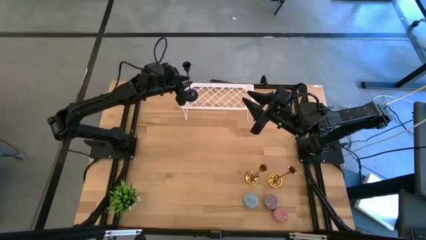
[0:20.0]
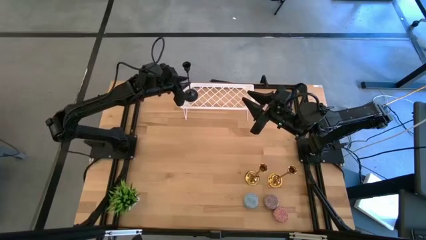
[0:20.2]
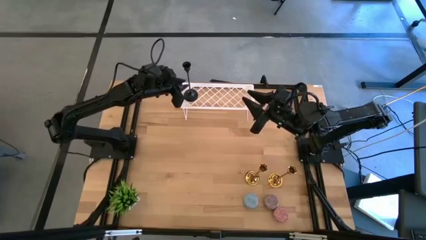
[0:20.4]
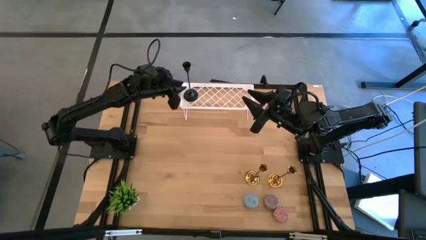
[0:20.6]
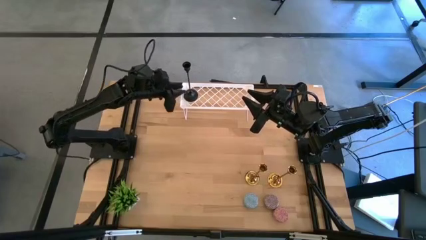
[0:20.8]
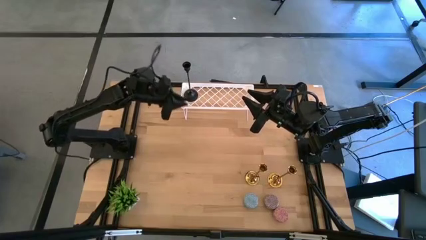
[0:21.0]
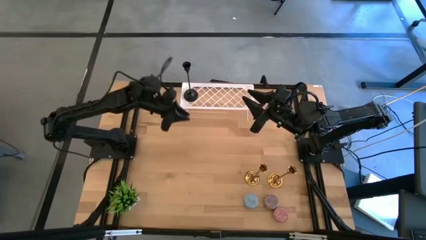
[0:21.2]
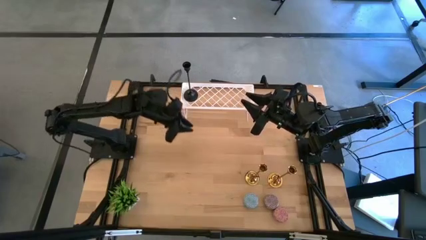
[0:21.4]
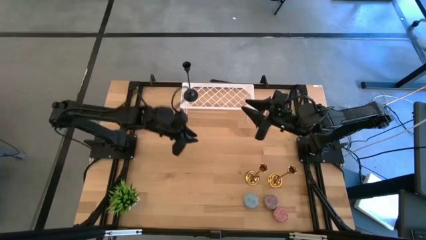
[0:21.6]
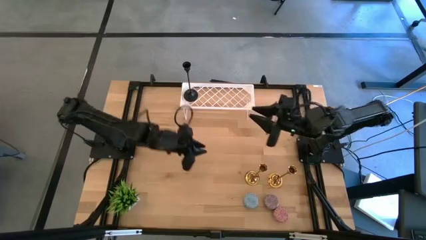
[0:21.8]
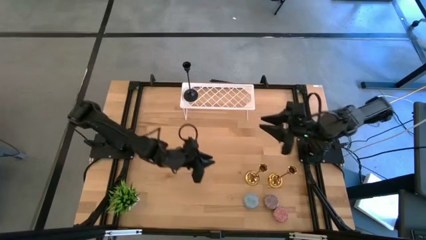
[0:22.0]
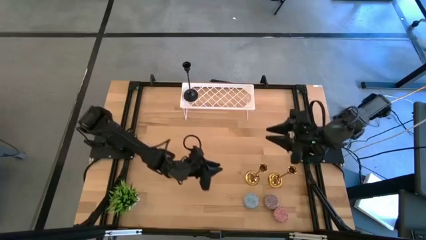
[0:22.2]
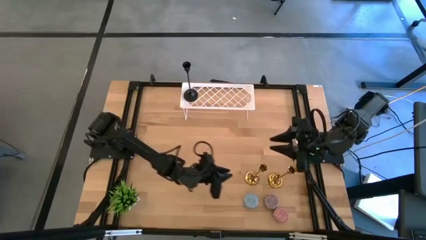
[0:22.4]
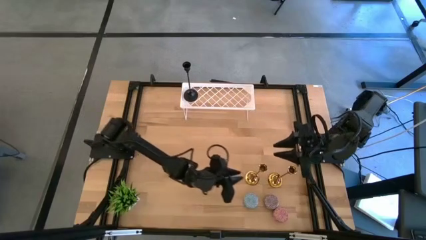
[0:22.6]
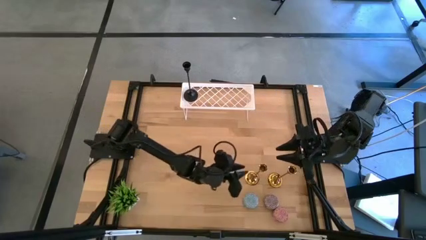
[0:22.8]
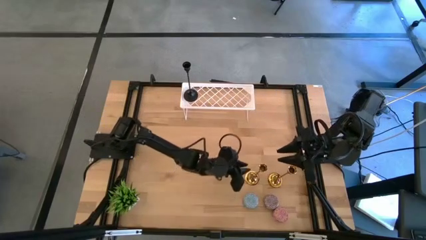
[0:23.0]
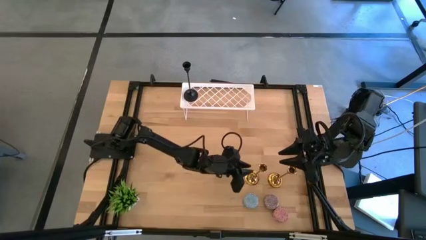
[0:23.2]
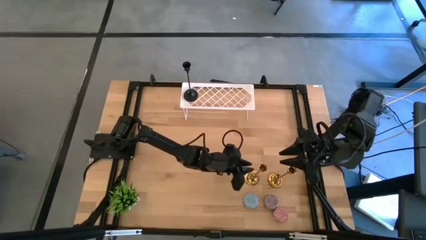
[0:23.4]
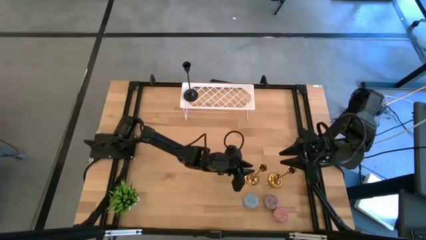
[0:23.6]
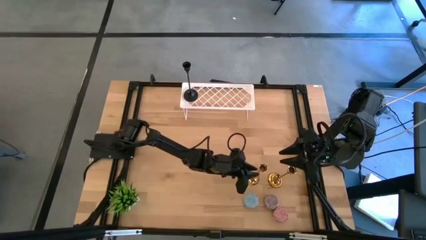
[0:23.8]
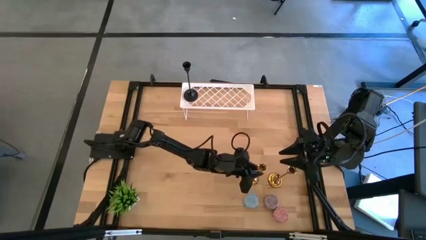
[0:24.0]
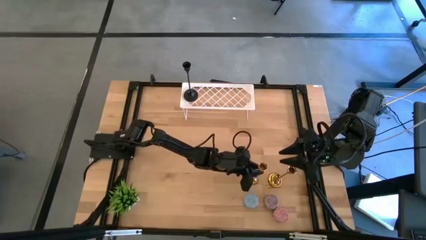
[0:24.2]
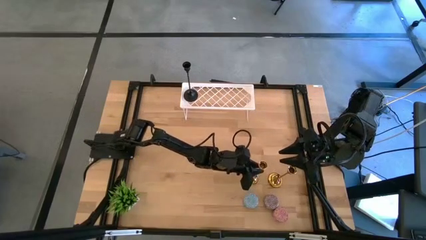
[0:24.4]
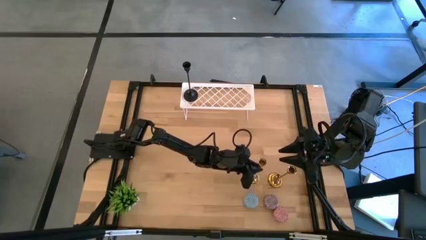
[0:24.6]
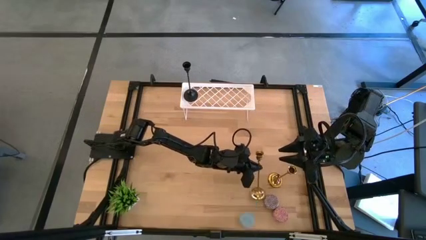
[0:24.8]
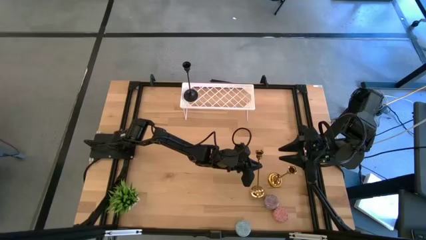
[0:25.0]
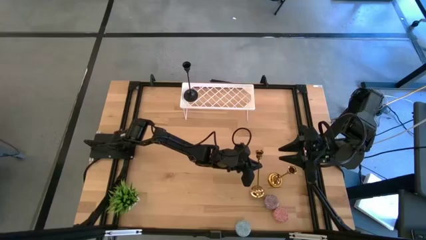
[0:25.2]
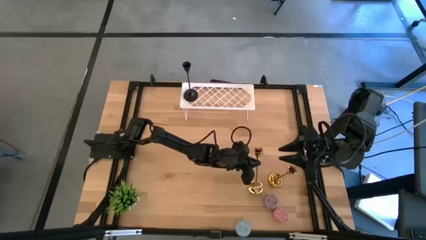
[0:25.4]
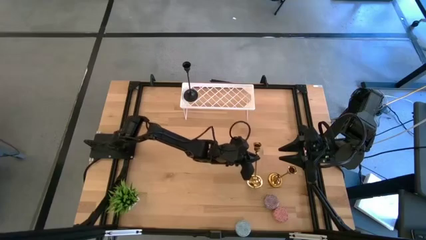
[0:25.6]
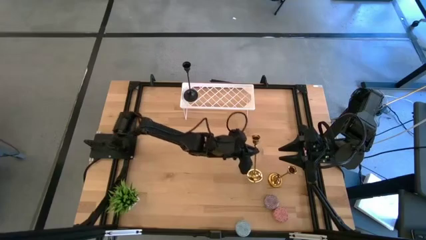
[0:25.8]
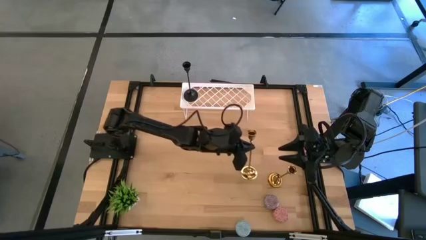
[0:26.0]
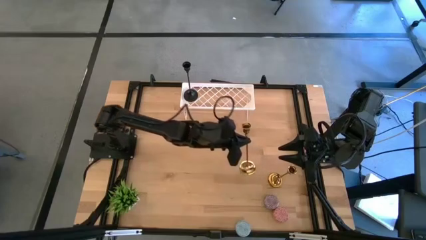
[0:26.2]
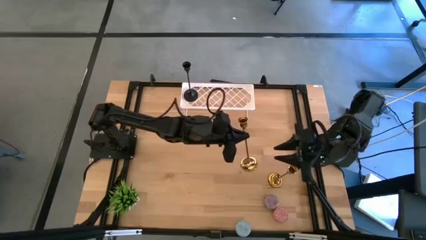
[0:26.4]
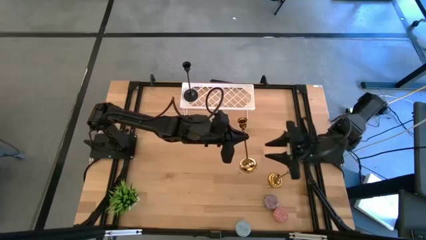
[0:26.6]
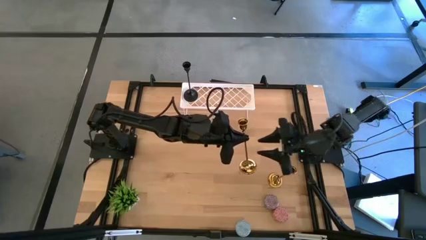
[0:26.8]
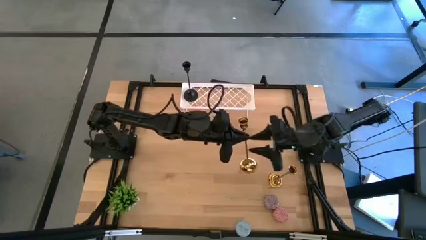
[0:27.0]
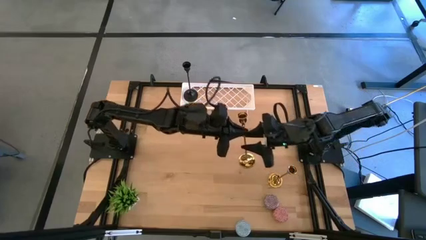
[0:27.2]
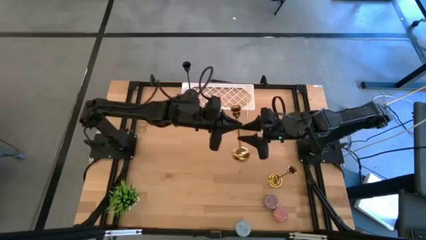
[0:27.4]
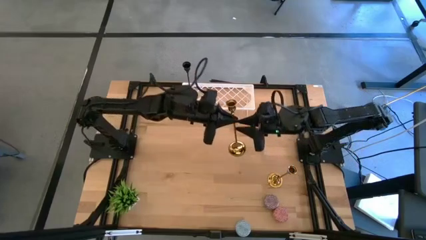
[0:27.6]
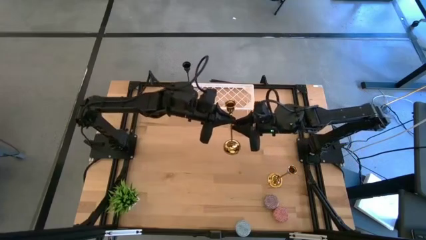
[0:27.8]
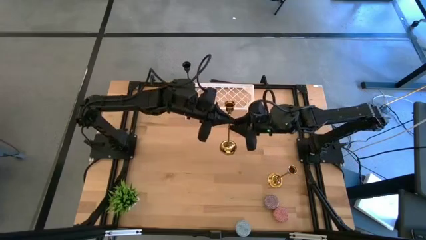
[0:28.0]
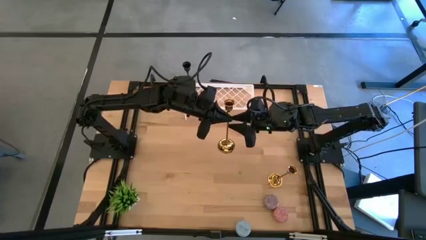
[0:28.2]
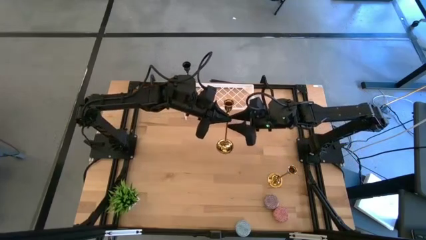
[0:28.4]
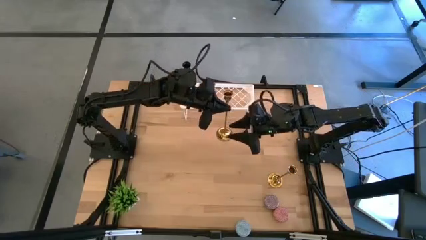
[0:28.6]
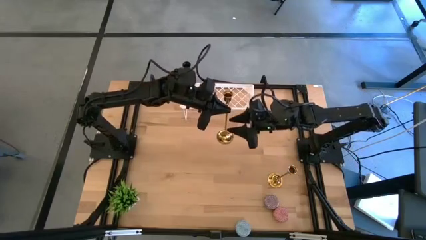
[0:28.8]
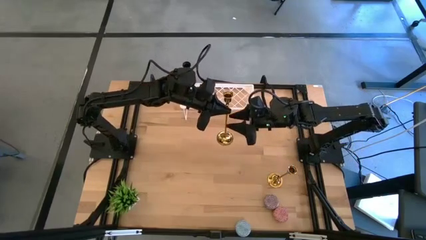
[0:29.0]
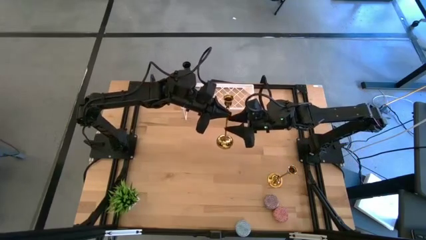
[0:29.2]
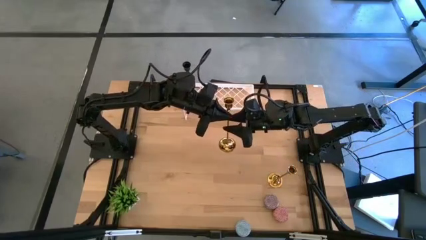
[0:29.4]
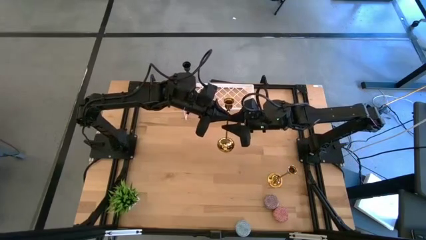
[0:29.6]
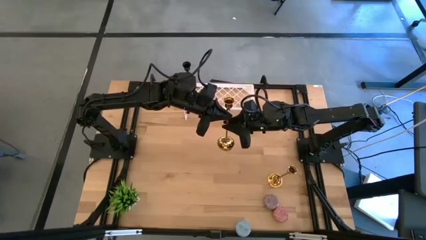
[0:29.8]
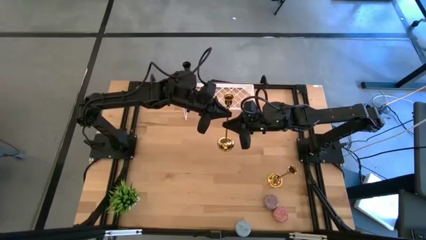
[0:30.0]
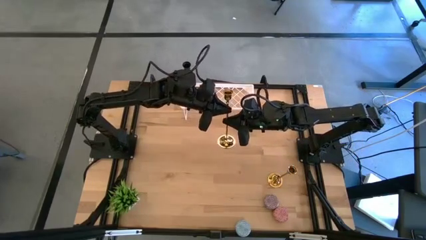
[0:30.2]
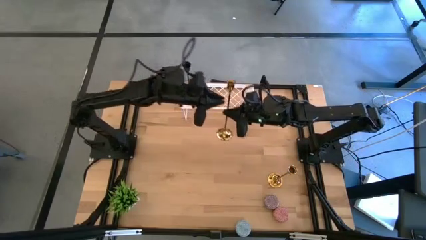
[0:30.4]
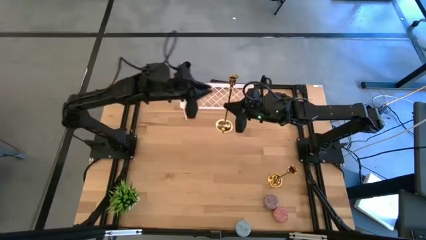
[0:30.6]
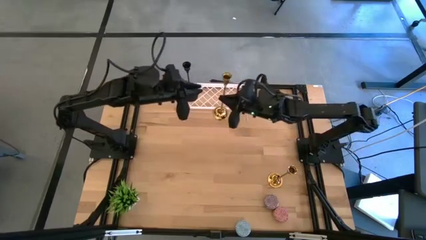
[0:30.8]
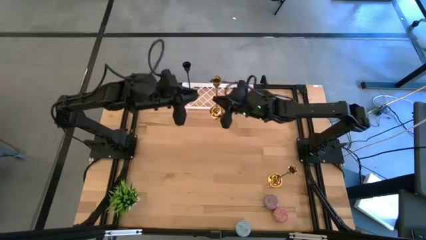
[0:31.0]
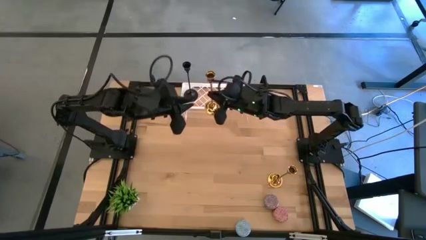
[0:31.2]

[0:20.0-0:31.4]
Task: Pick & Place candle stick holders
Put the left gold candle holder on the shelf
